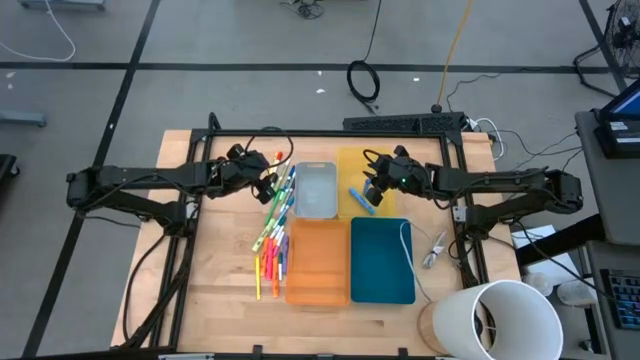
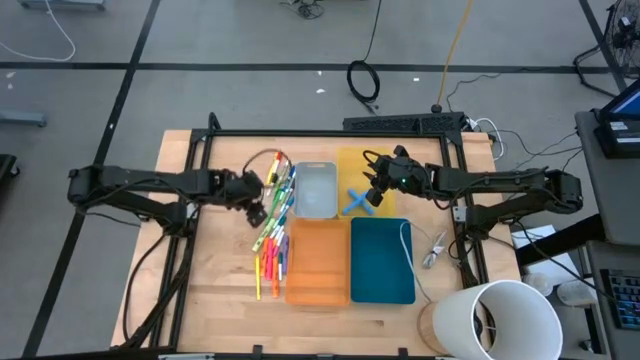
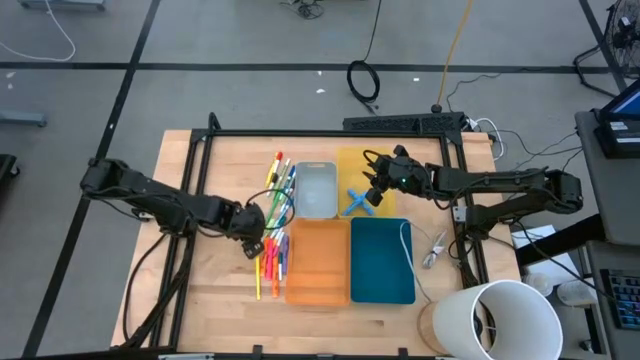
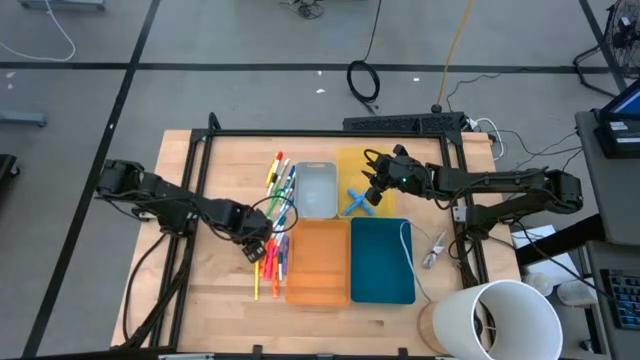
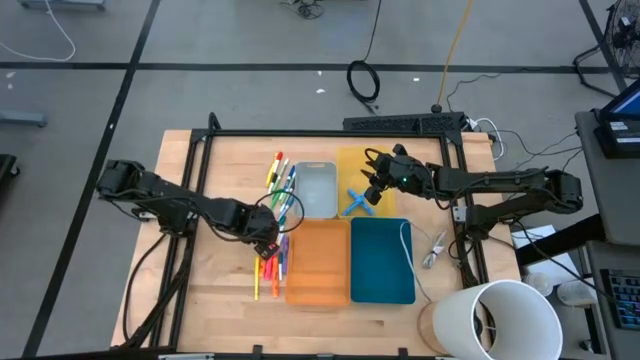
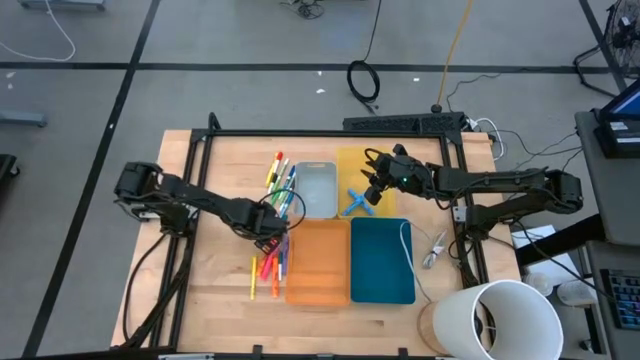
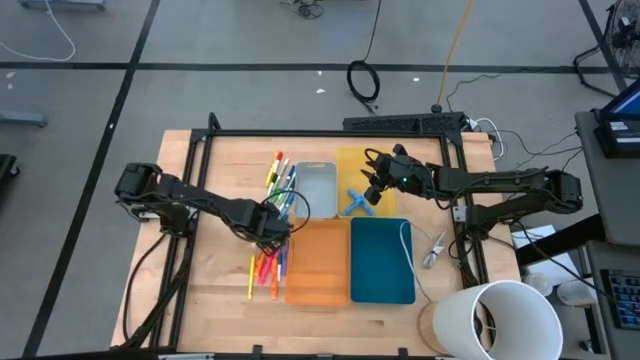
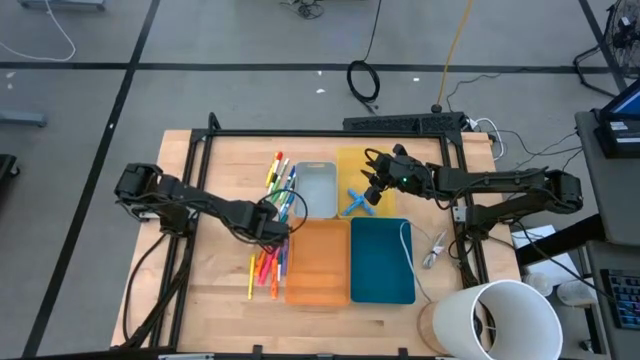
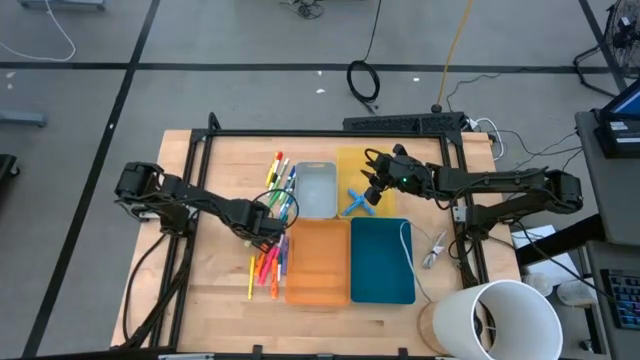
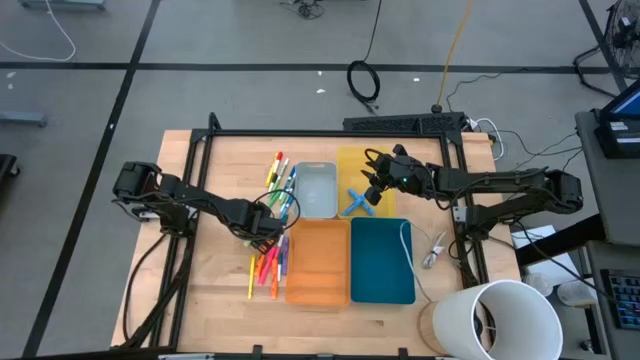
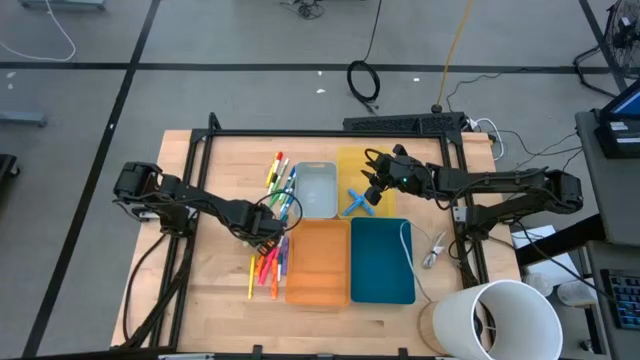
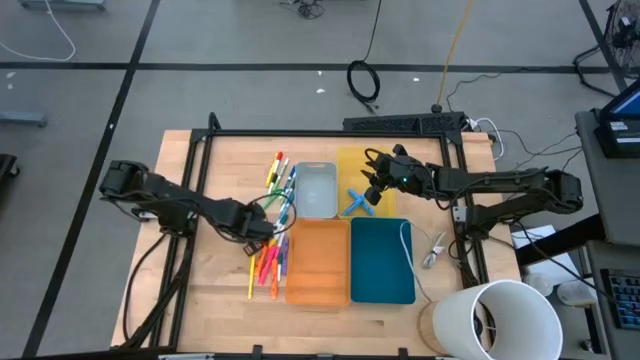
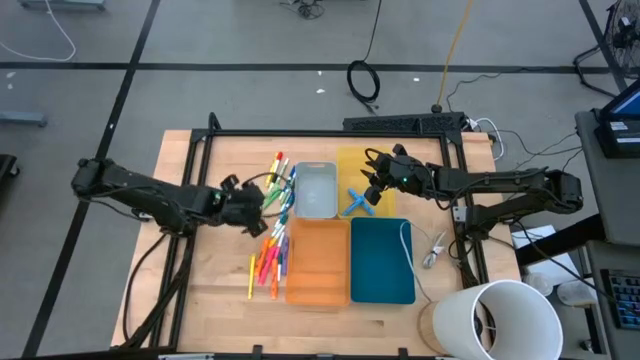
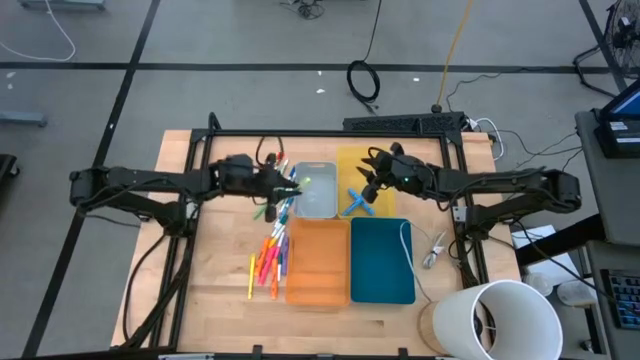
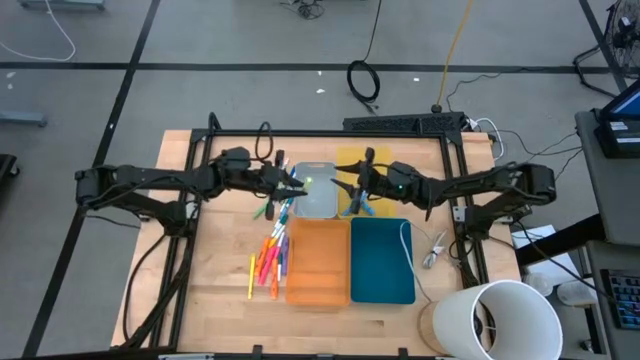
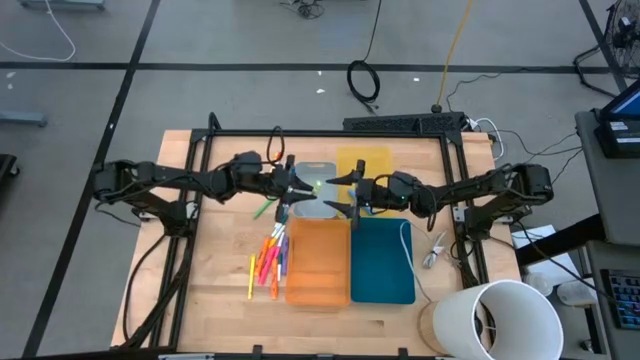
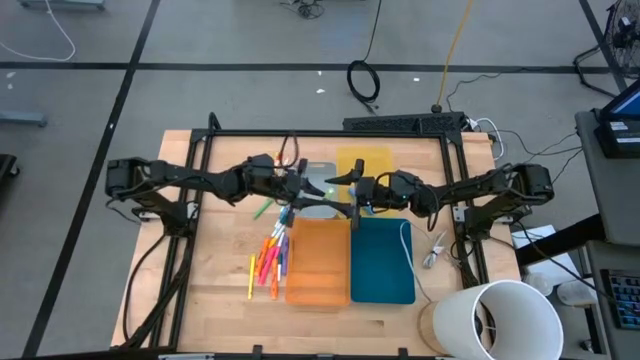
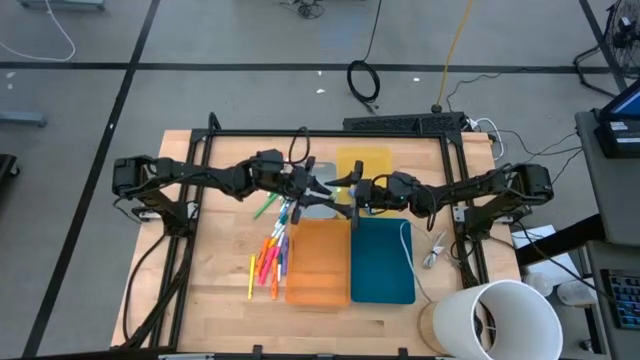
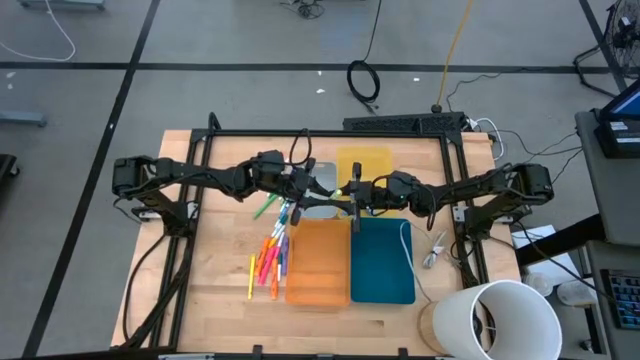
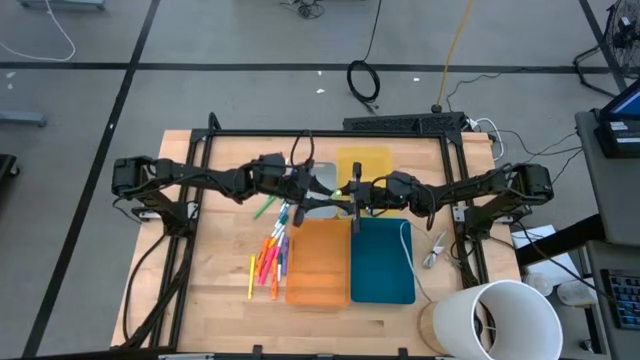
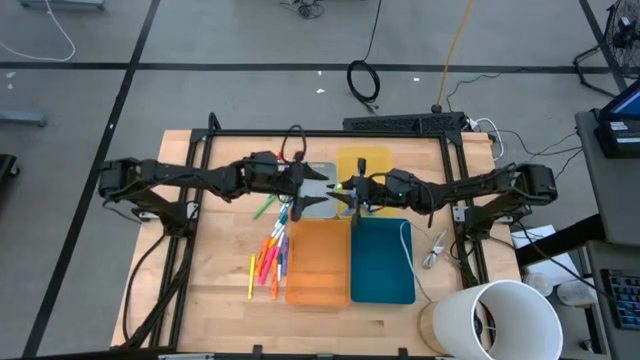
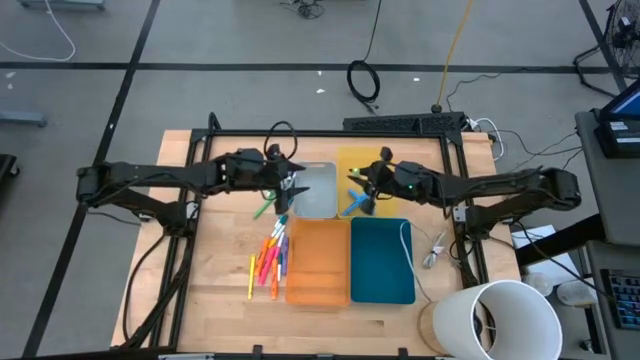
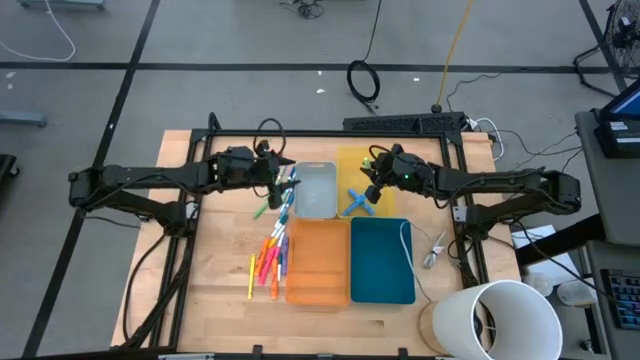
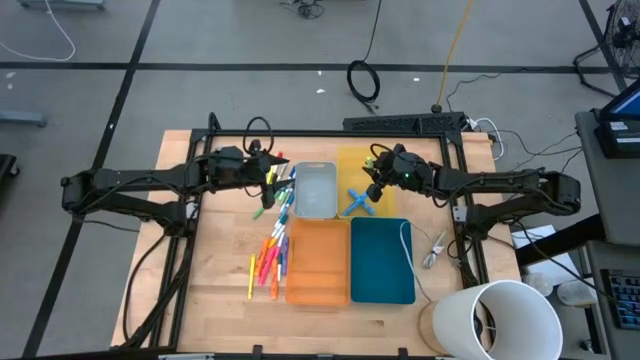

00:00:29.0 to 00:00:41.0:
Task: Pick & Place Markers
Put the green highlighter pen into the yellow bin

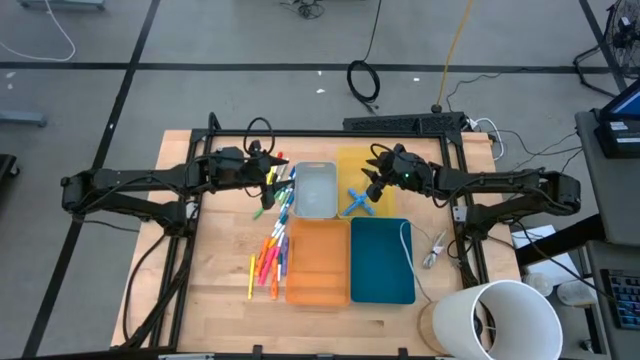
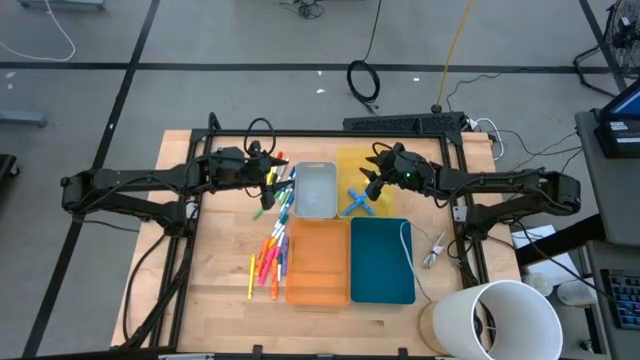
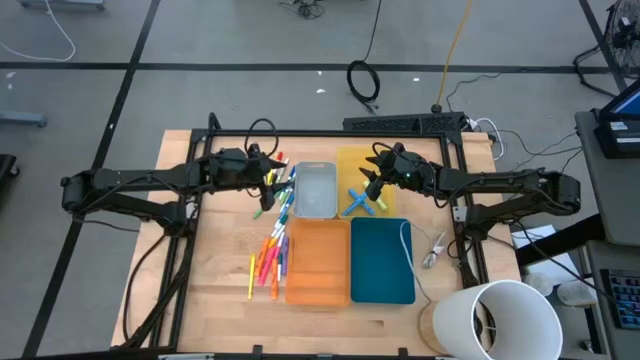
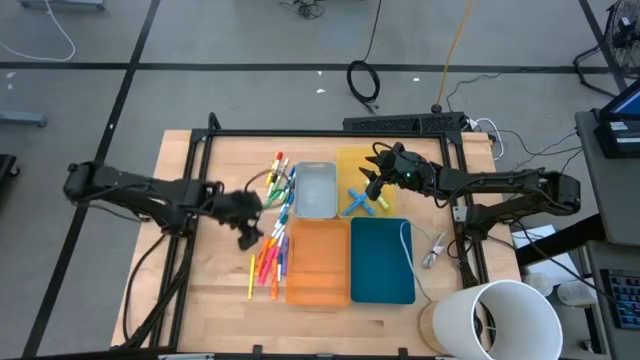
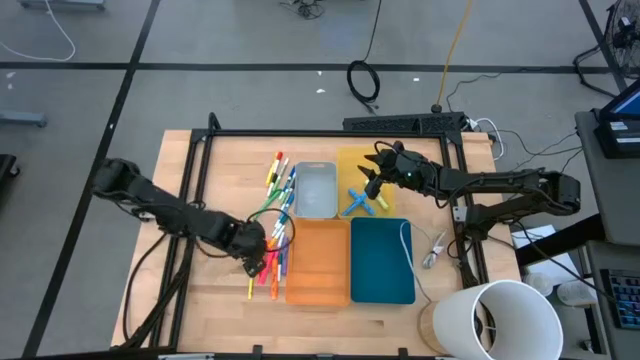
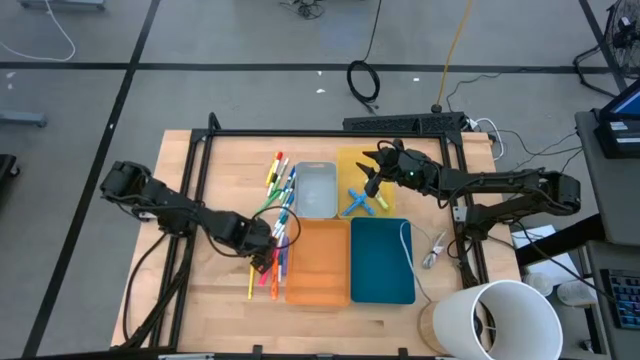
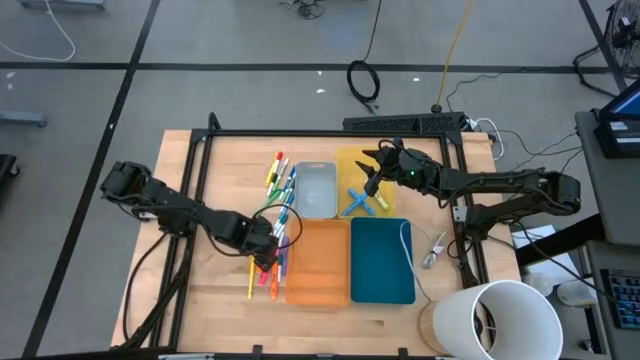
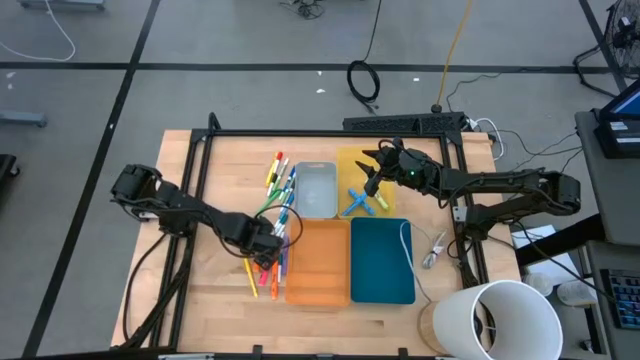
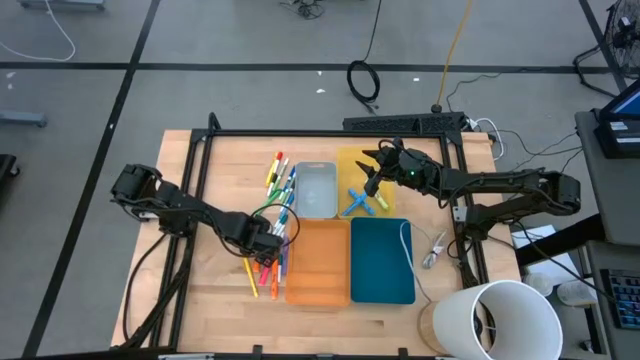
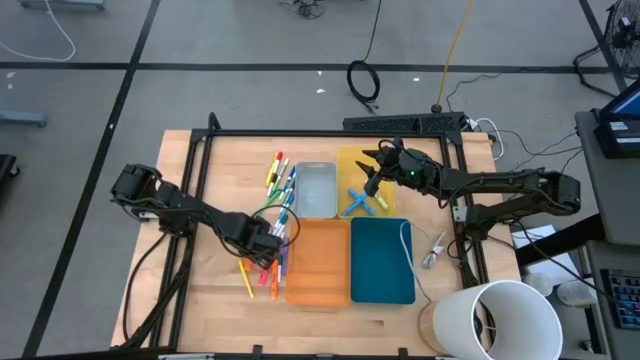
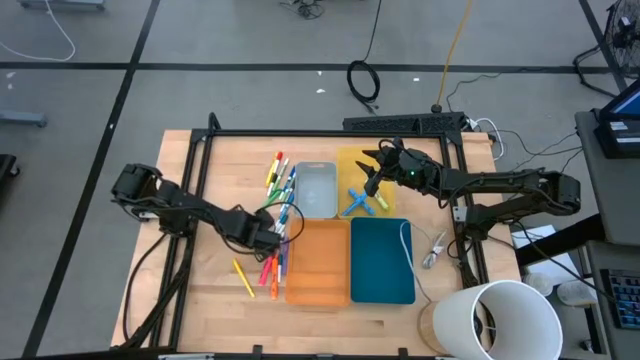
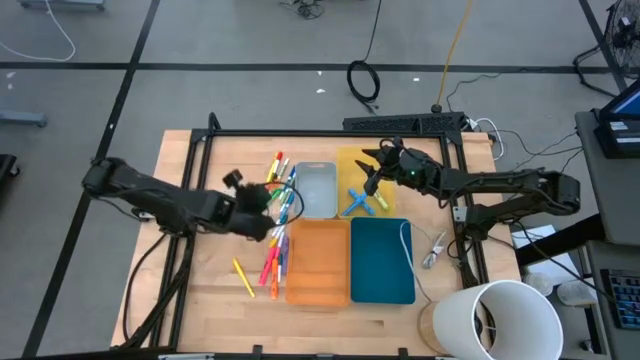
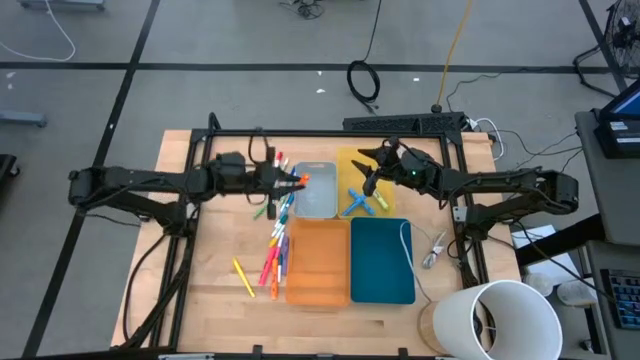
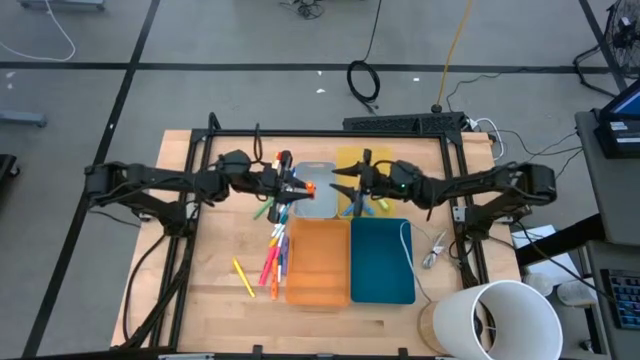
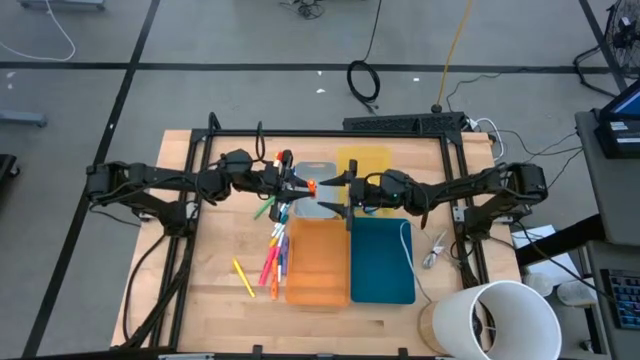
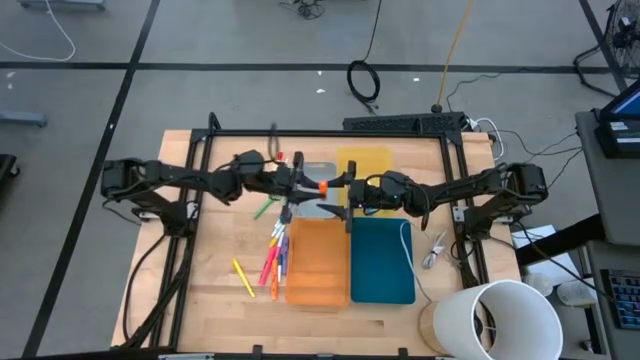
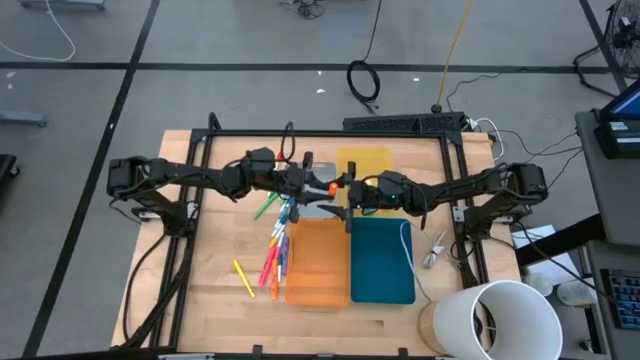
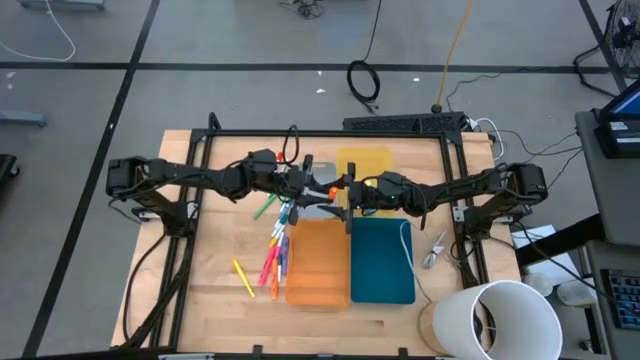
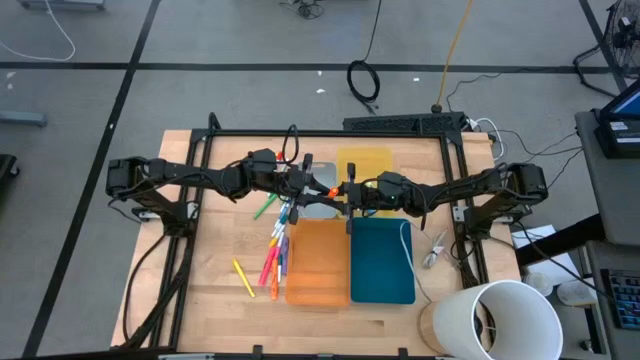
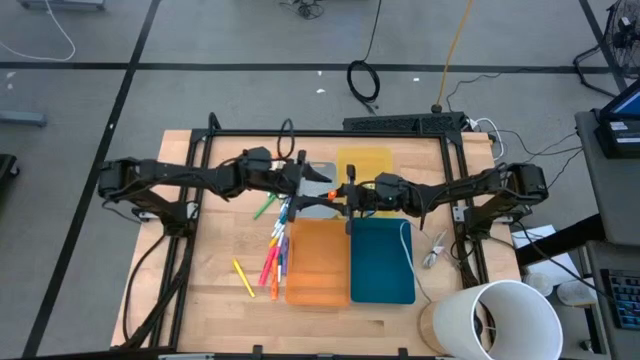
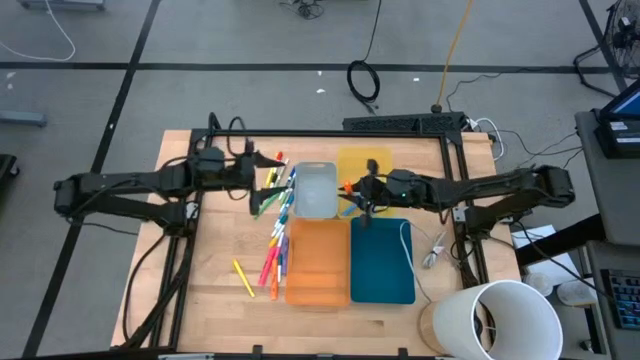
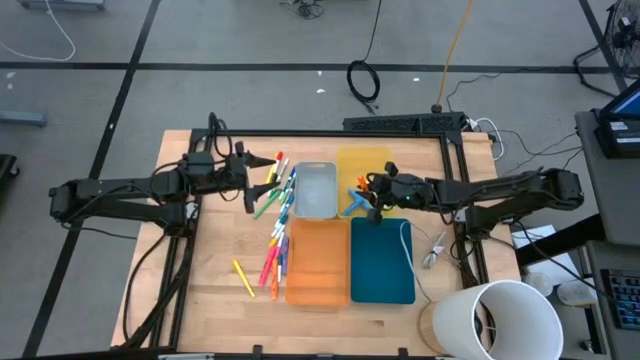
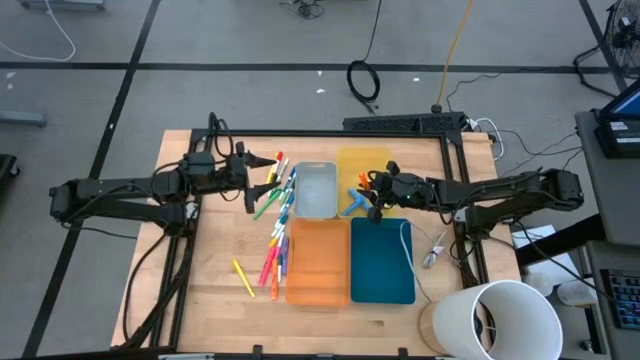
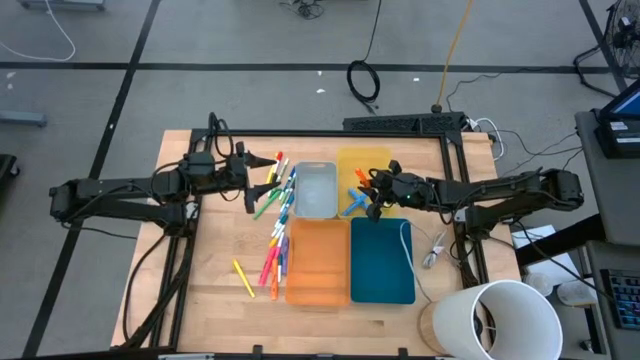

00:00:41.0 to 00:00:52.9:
Put the orange highlighter pen into the yellow bin
